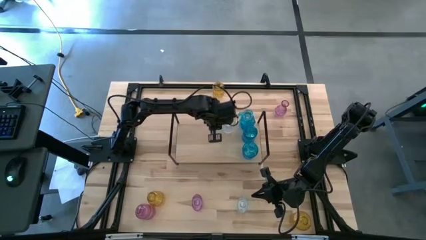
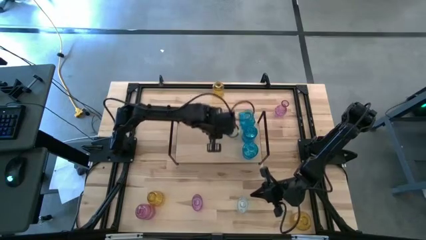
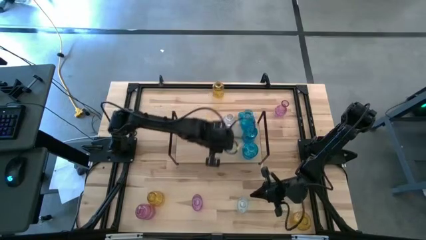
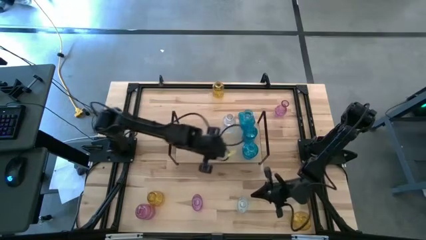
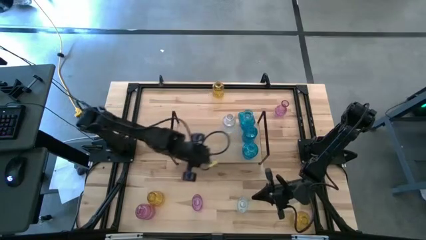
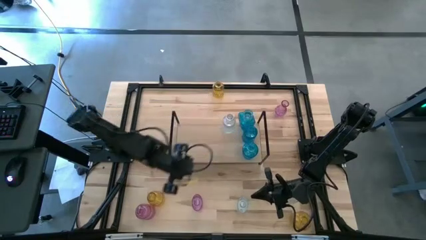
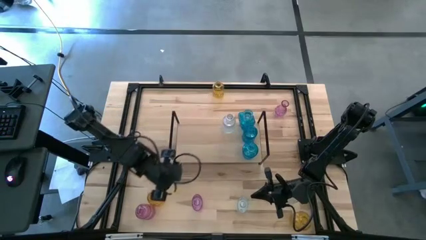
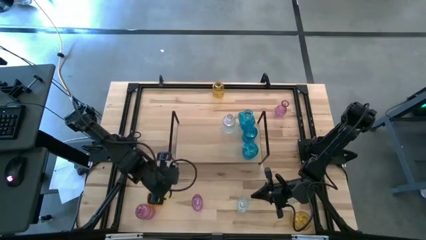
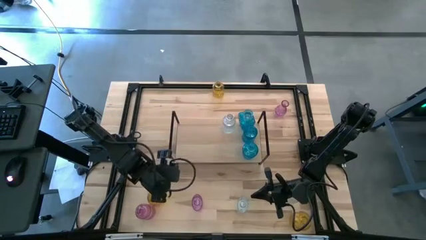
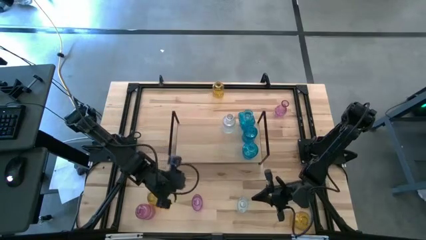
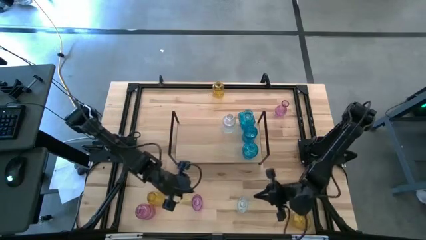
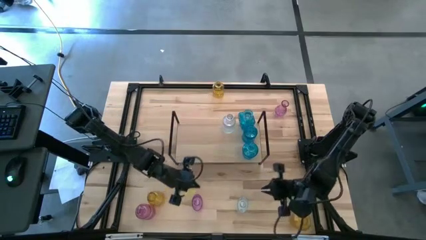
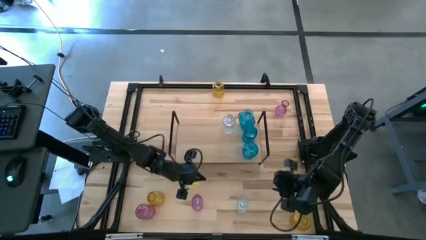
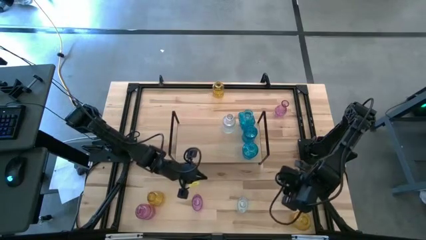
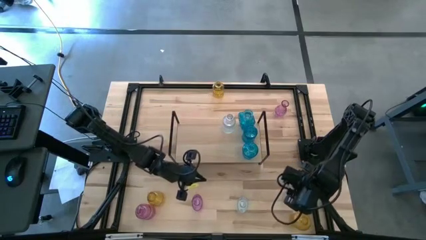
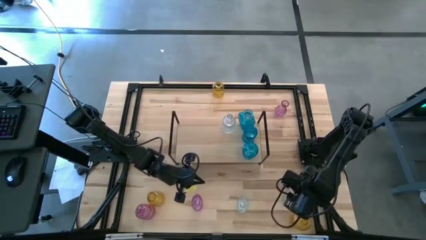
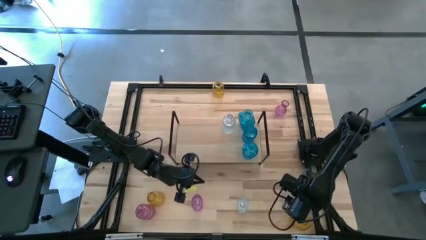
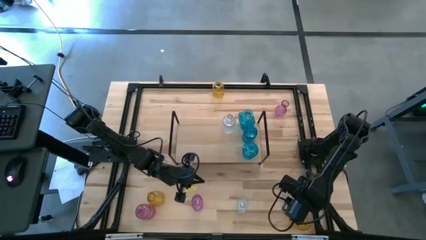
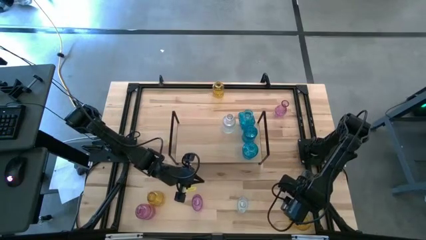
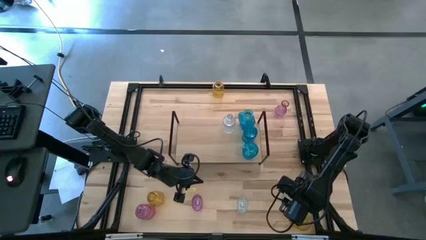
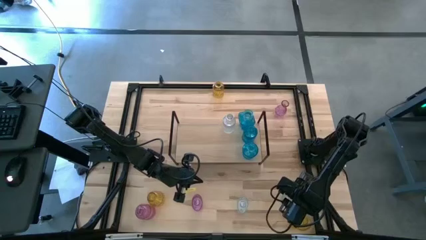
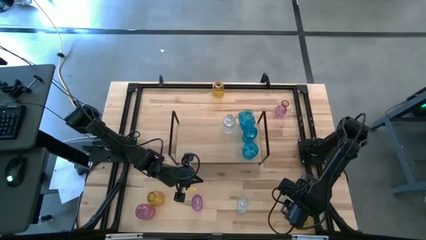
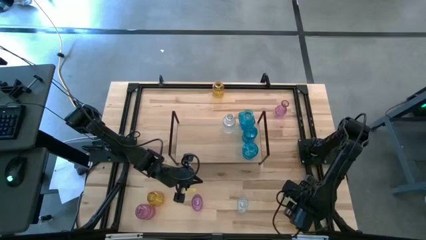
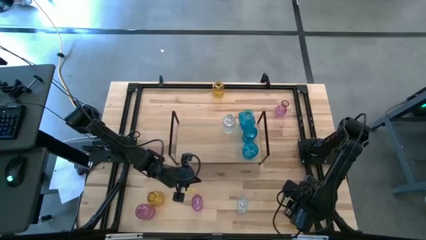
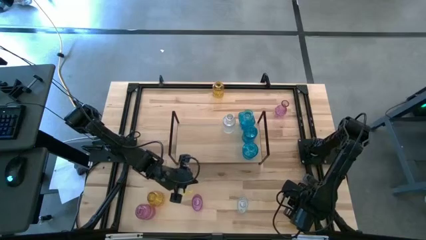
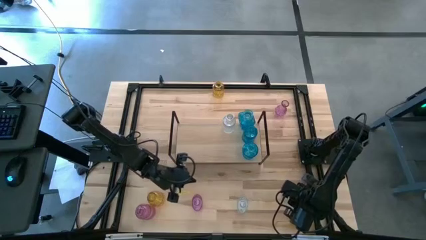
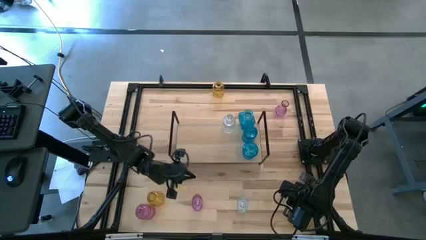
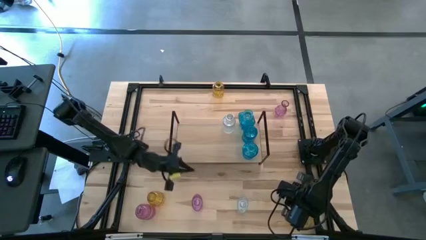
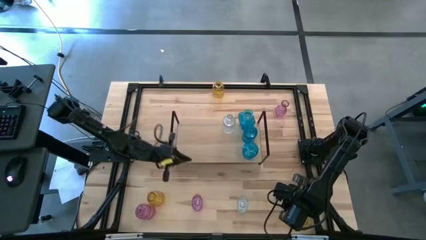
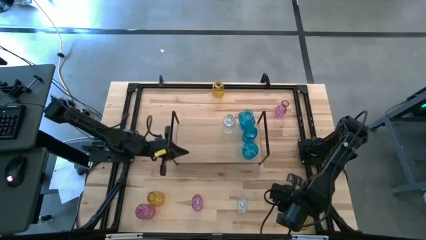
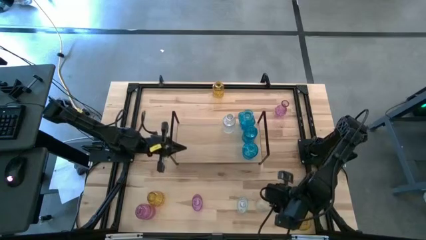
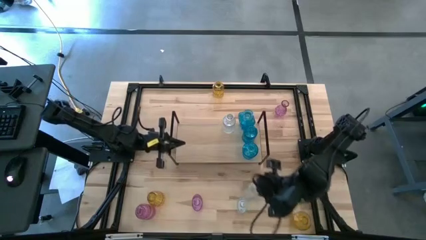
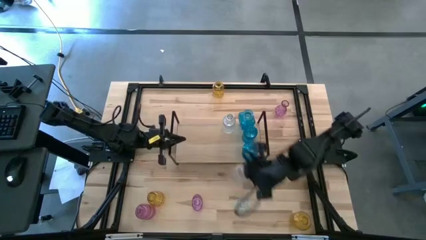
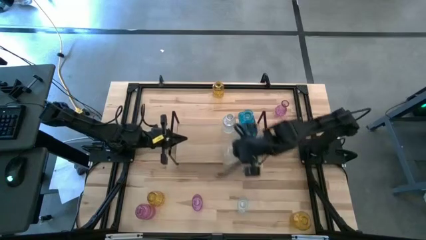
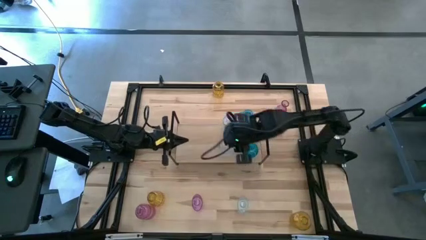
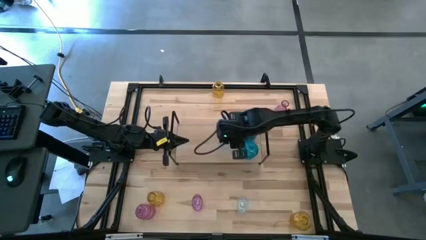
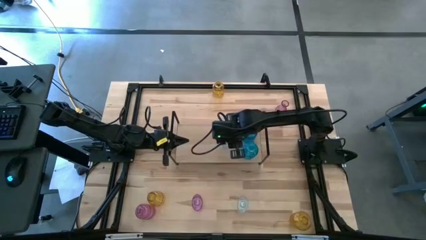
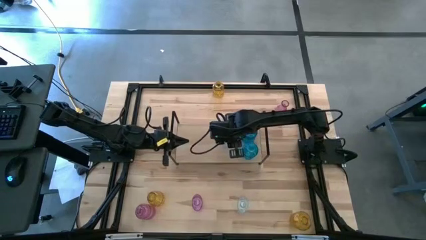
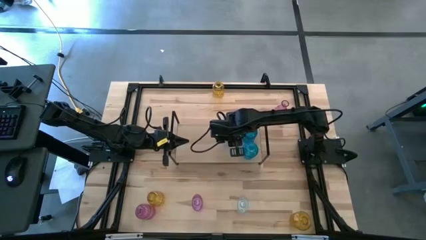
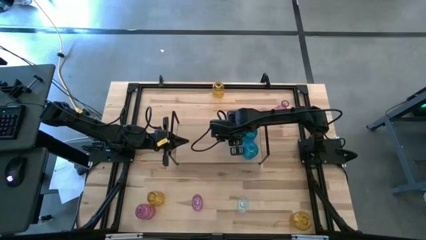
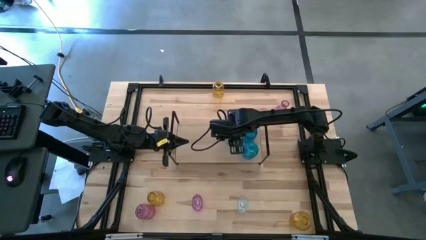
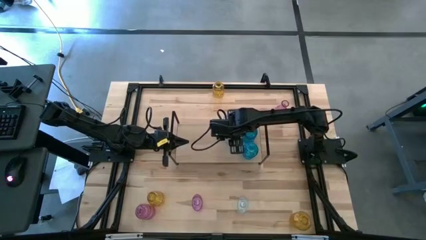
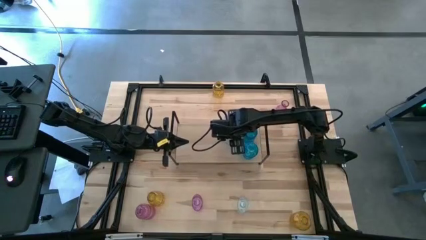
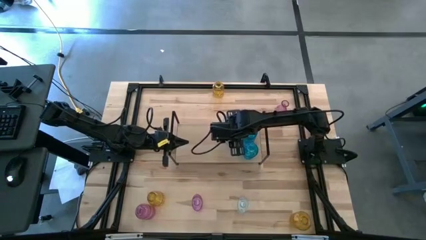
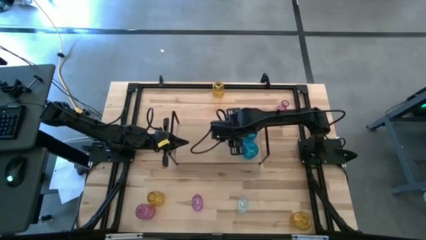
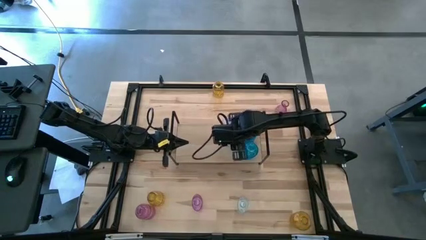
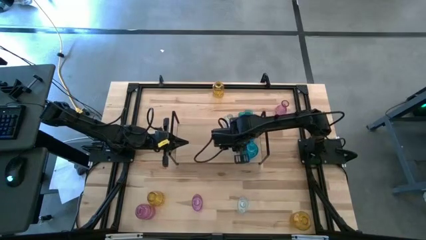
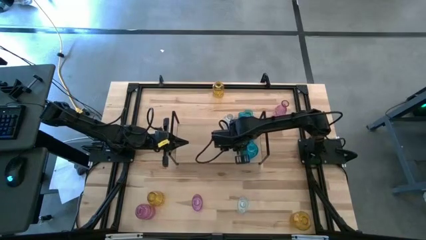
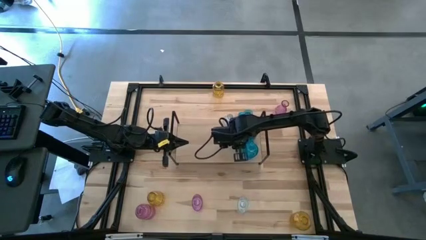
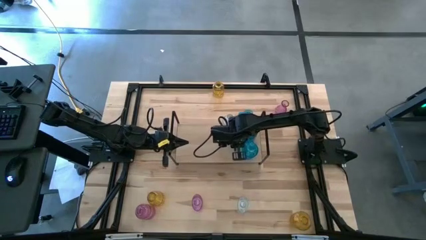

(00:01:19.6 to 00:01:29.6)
Task: sort vases onto shelf
Put the right transparent vase aligned with the other transparent vase on the shelf

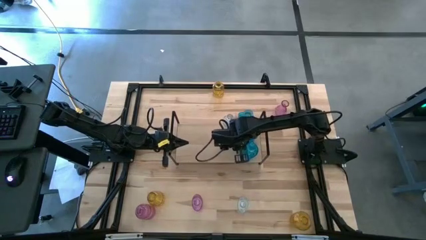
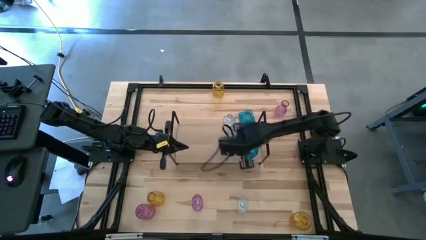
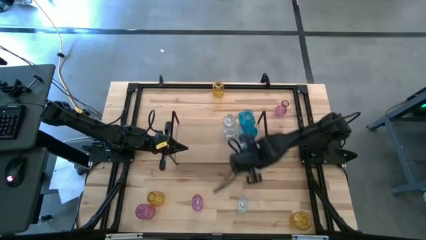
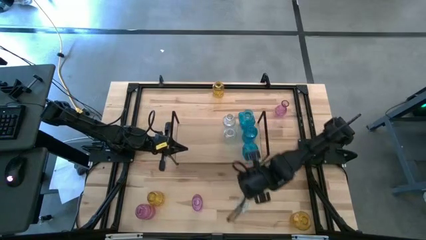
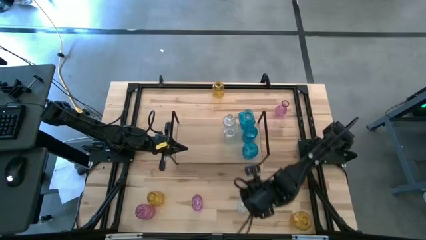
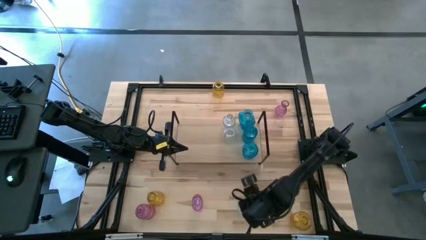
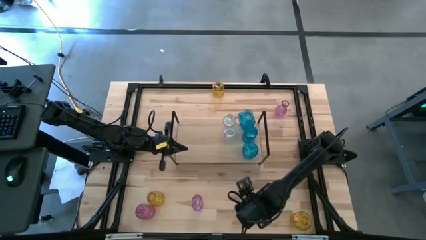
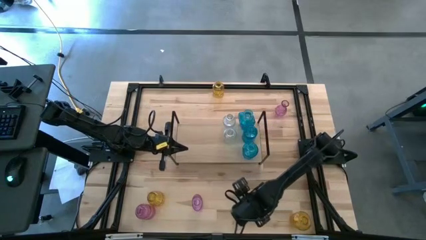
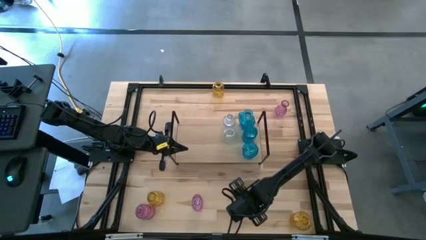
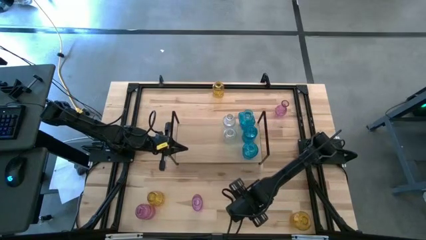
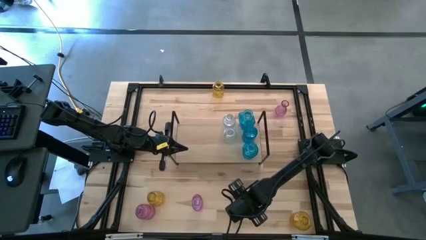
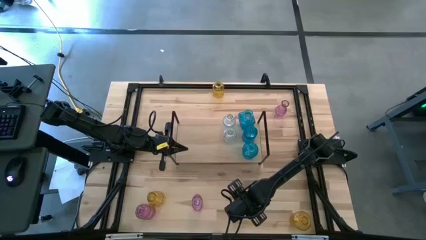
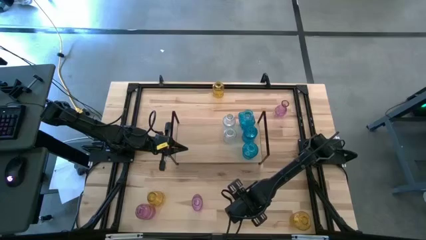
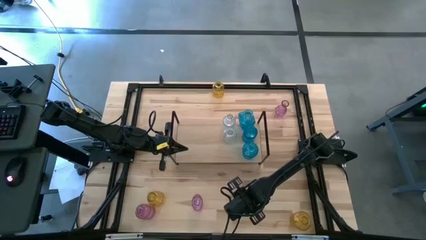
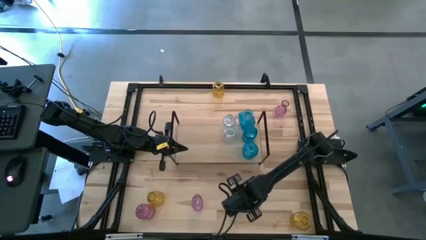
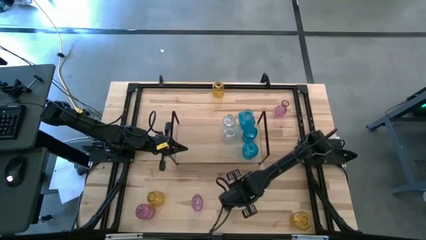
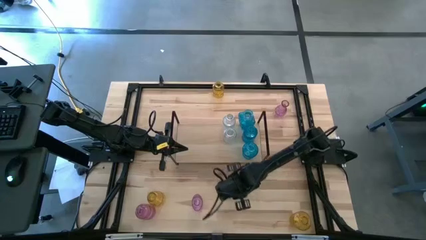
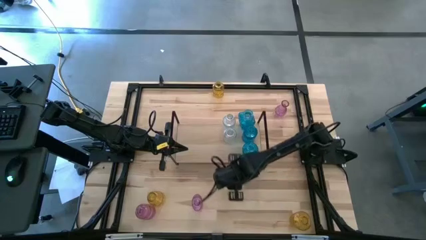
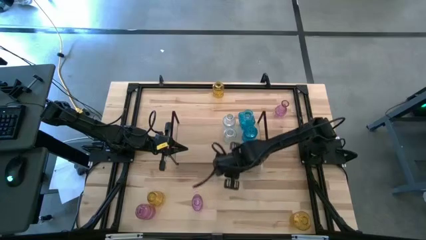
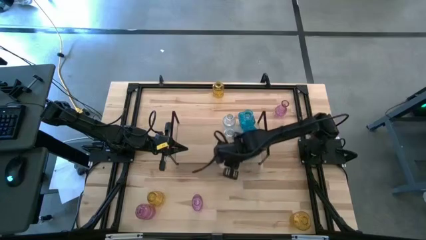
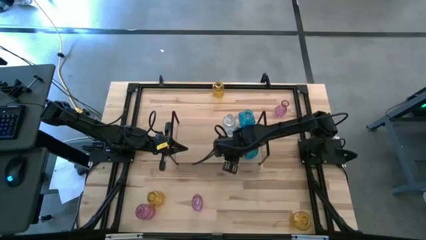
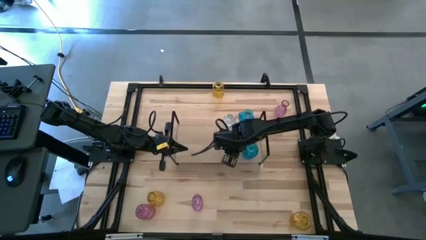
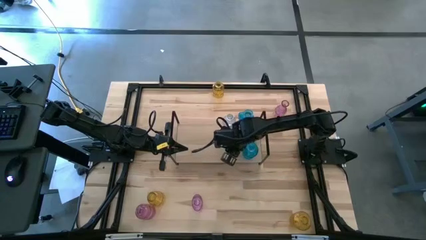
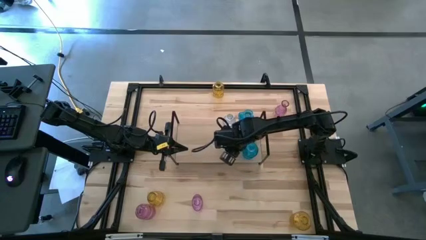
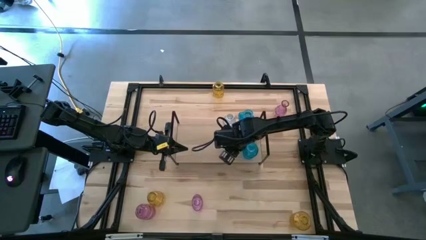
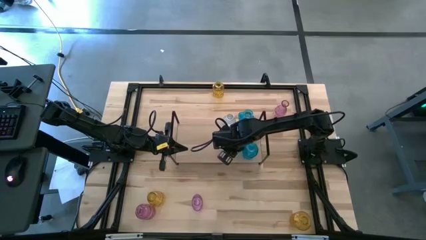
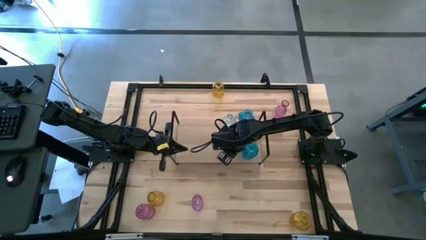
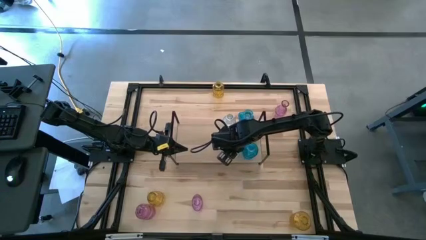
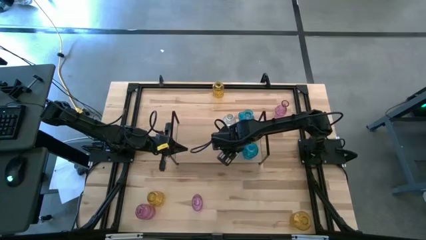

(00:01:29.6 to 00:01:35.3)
Put the transparent vase aligned with the other transparent vases on the shelf
